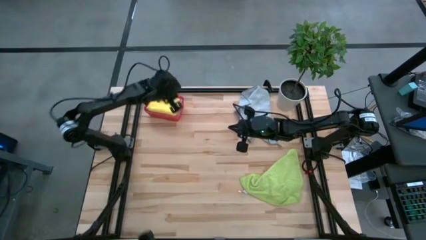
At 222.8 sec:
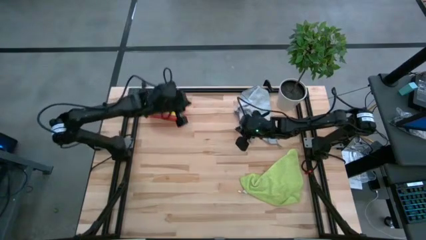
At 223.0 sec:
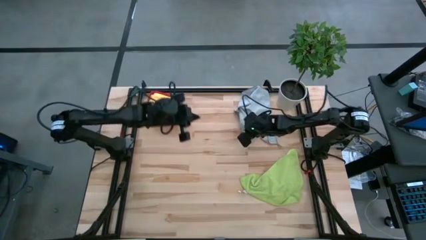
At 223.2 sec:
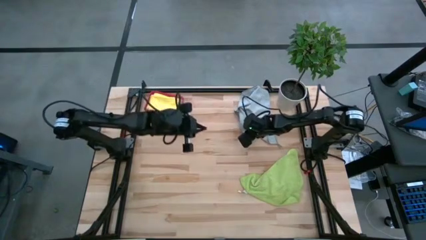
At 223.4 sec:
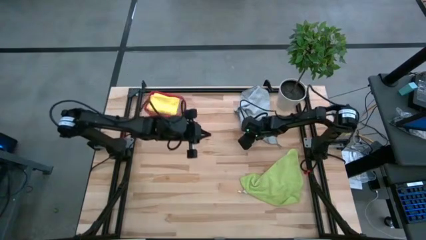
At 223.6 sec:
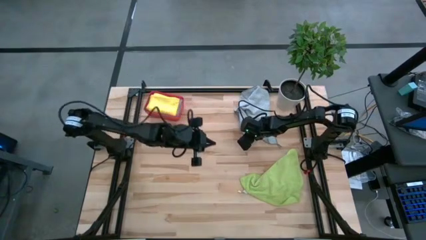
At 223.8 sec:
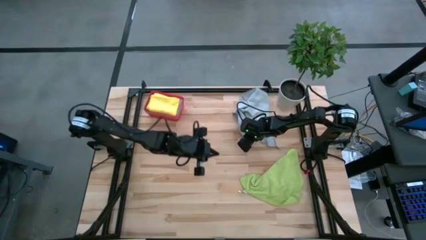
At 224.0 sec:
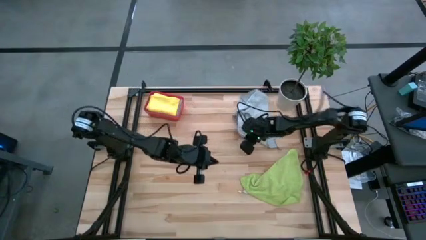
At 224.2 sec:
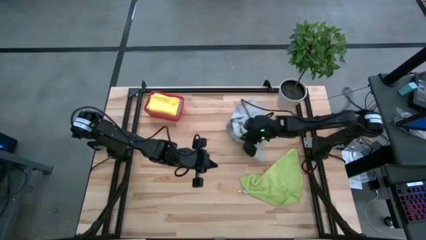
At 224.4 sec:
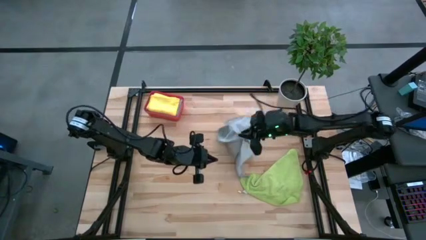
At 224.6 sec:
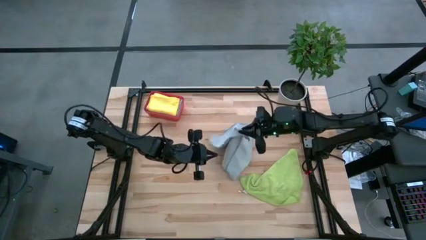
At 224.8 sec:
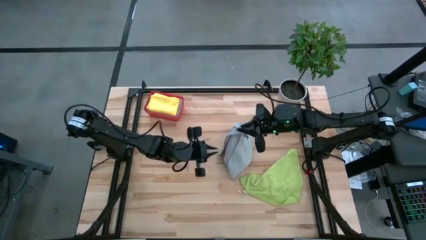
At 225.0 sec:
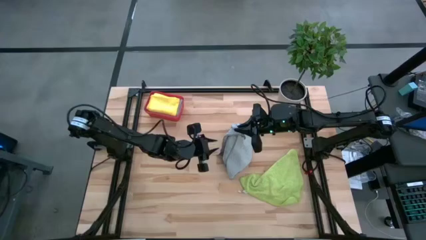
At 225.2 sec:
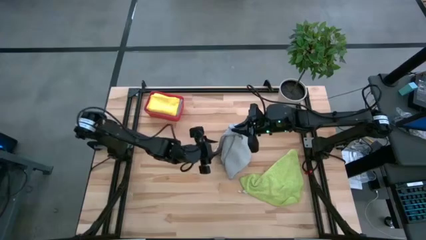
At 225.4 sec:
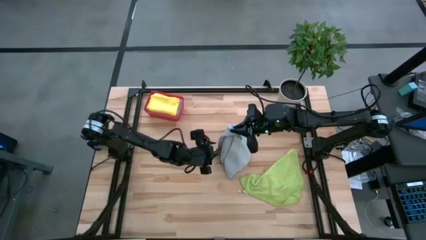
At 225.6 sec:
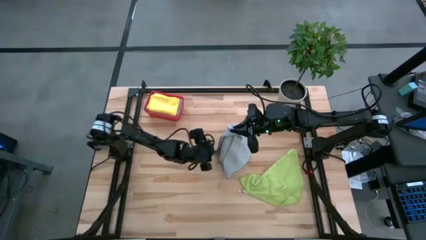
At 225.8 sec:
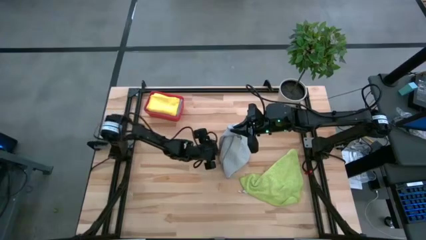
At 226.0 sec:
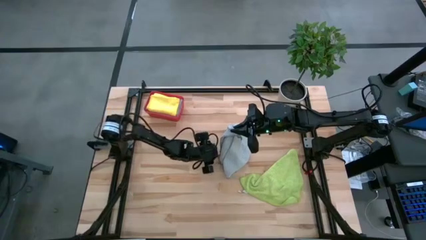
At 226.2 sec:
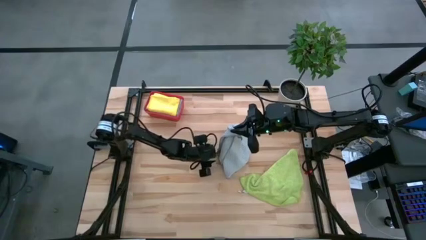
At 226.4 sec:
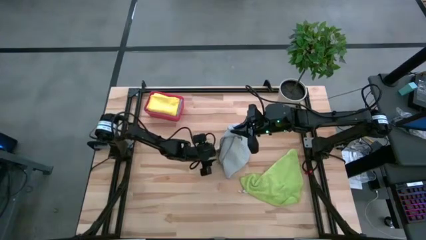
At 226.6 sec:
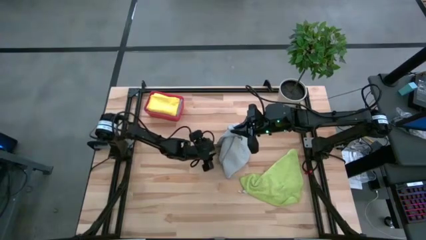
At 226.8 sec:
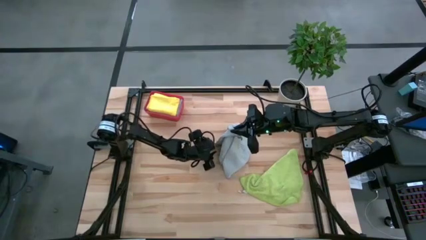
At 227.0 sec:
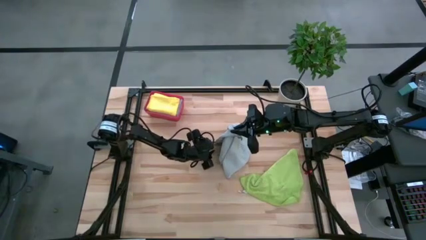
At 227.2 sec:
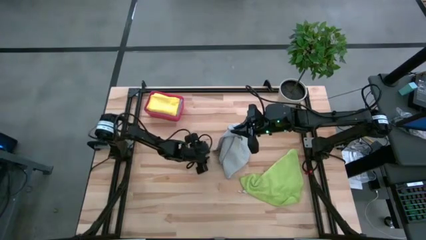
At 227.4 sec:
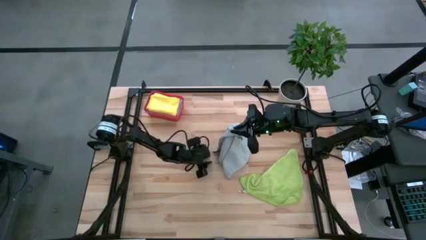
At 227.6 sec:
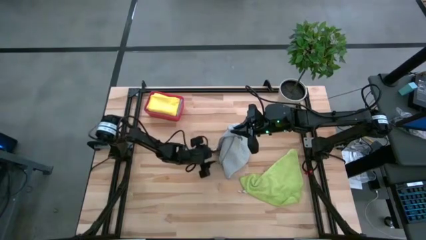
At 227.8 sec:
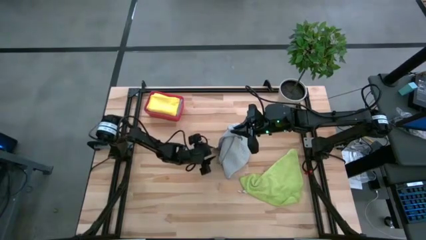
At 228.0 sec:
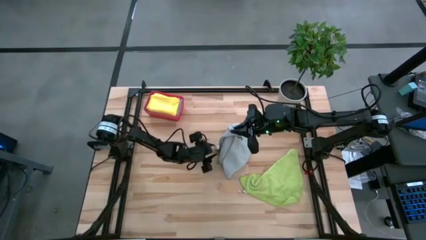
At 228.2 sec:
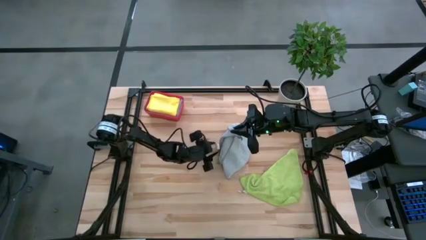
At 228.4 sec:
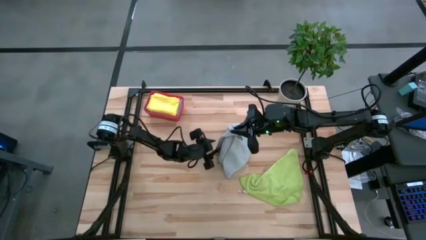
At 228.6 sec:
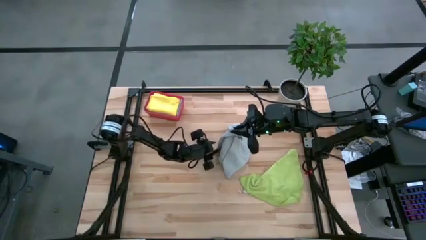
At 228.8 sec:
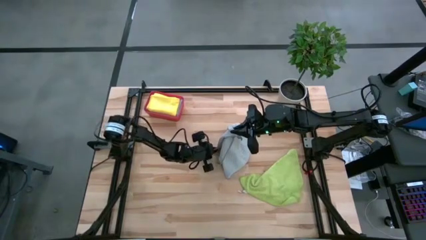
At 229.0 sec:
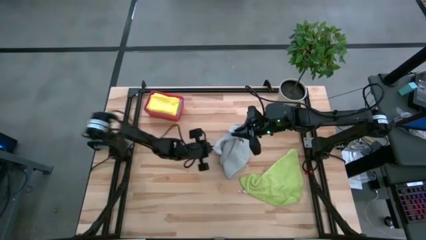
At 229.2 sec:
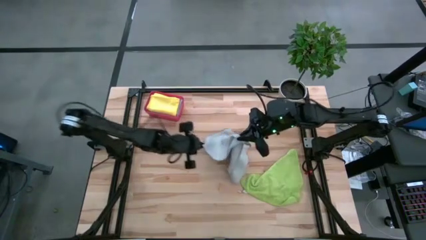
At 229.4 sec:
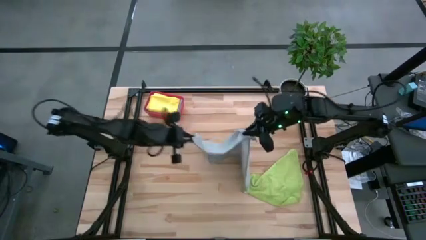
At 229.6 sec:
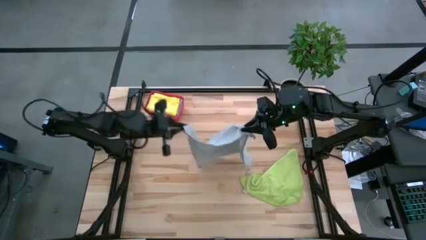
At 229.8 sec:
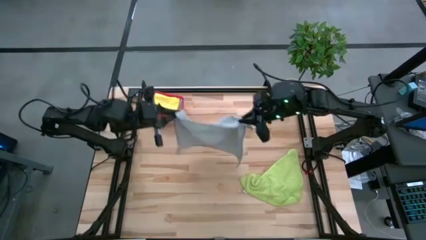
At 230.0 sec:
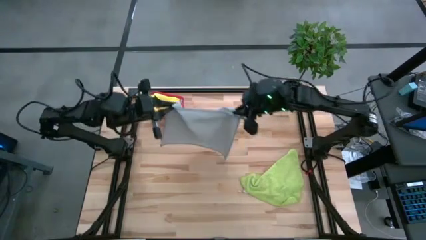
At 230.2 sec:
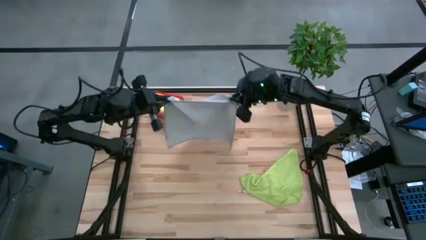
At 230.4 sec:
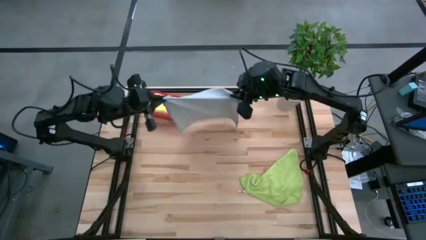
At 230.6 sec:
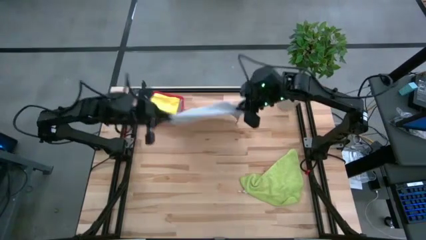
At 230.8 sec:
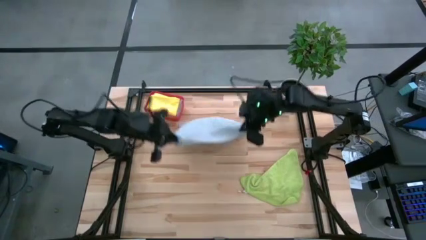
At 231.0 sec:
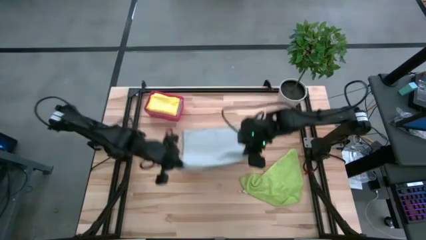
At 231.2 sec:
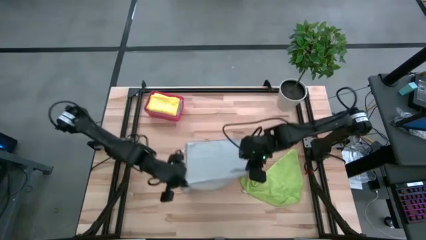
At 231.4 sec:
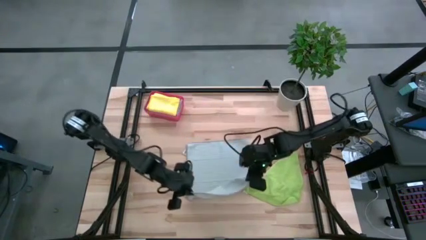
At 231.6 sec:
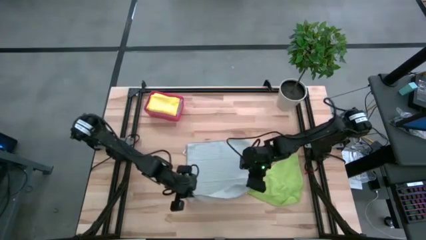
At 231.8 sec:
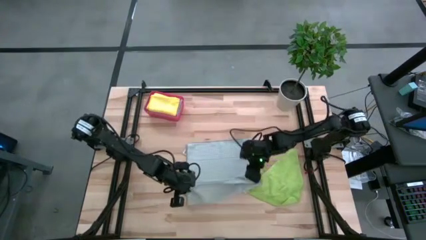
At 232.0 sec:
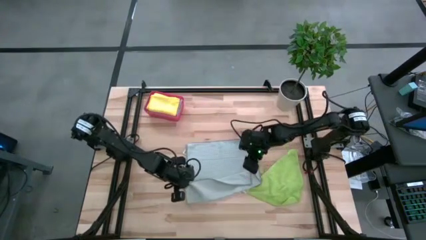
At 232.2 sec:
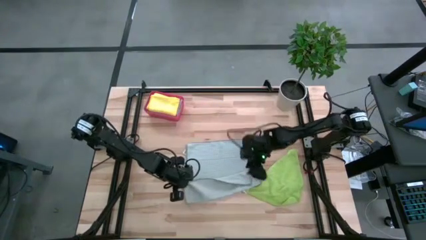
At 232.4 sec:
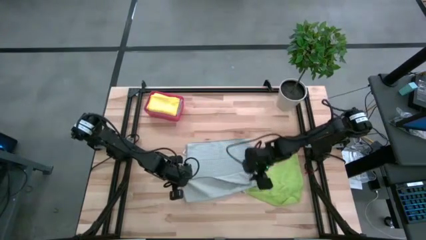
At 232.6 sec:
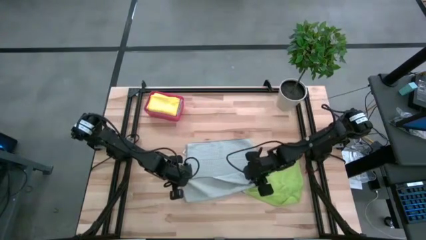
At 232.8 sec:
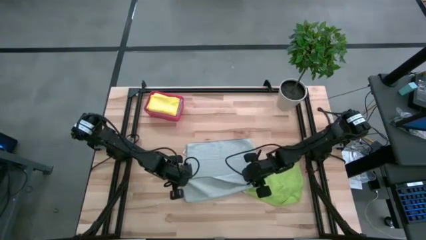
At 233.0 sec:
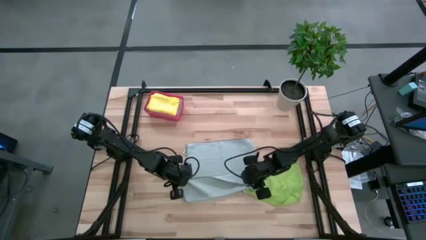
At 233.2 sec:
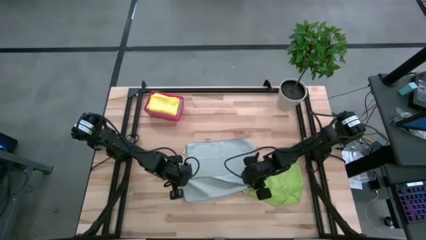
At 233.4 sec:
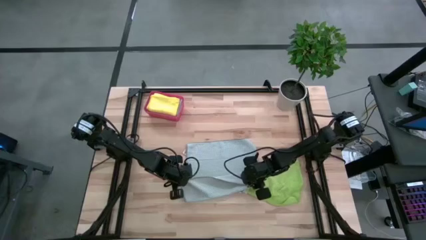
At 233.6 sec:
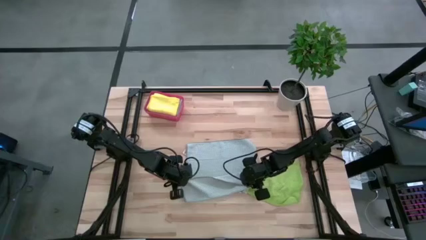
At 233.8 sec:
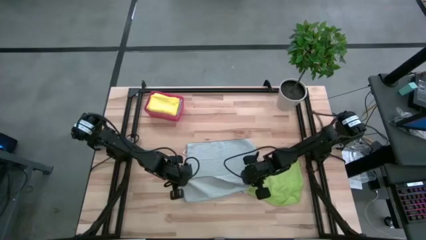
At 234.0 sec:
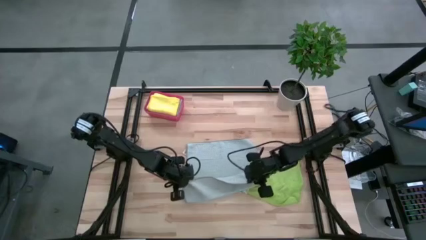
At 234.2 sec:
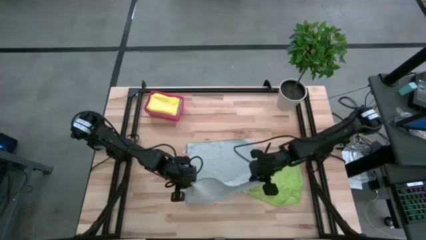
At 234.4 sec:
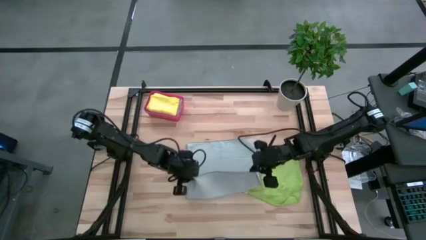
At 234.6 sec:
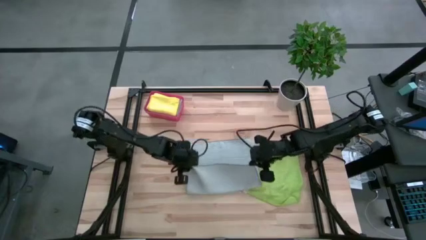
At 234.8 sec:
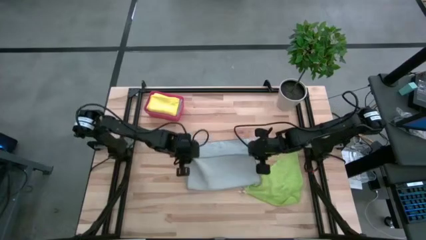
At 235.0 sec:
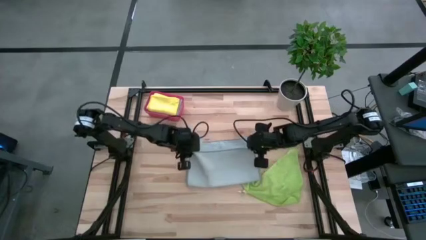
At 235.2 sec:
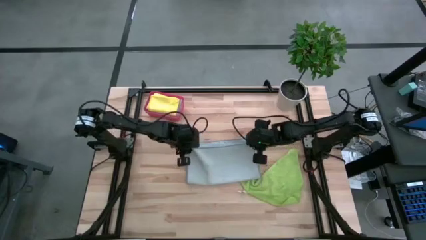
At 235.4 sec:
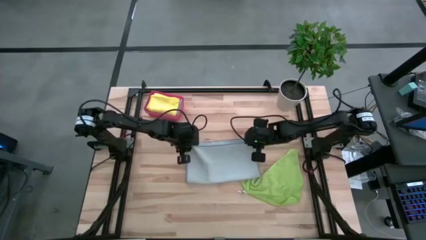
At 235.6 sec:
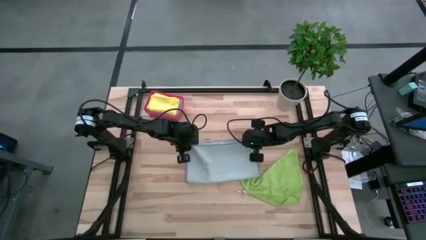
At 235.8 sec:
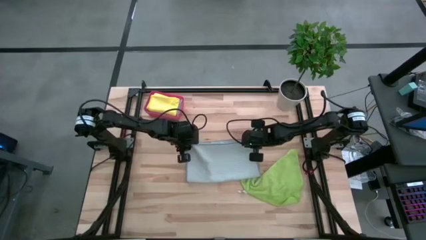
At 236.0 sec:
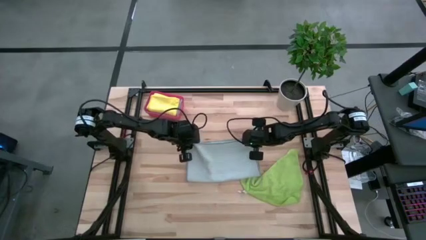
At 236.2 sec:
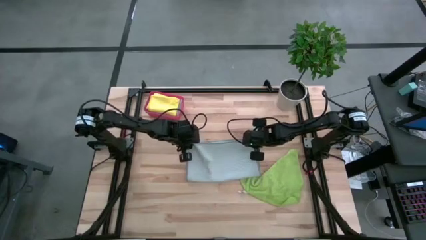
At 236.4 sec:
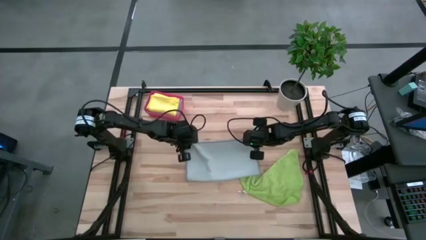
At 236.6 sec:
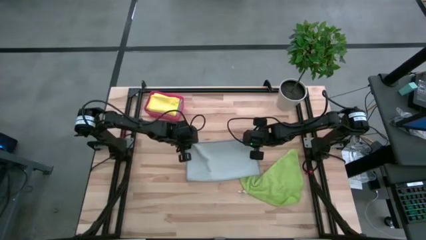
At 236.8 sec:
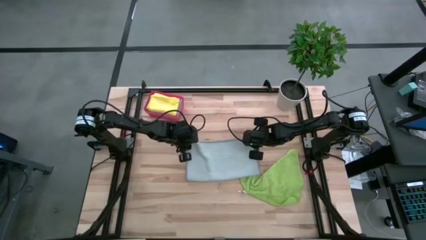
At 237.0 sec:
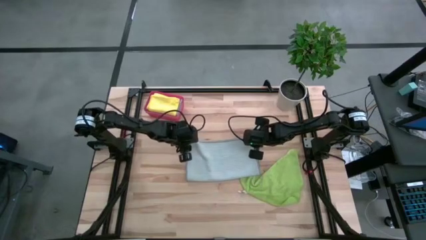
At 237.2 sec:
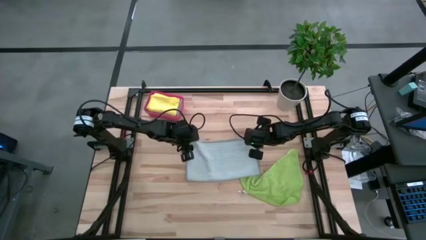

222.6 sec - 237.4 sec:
Task: Fold microfiber towels
Fold the gray microfiber cloth
